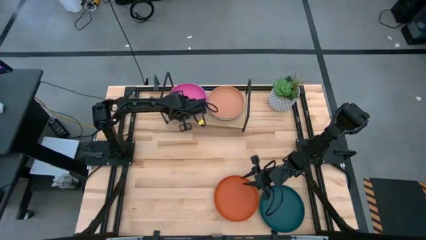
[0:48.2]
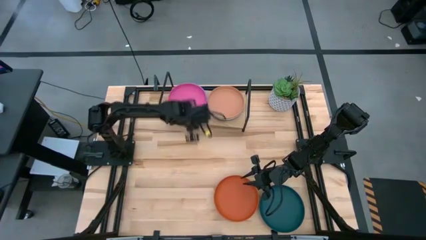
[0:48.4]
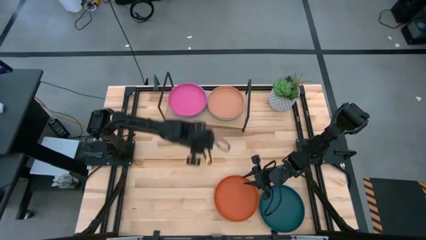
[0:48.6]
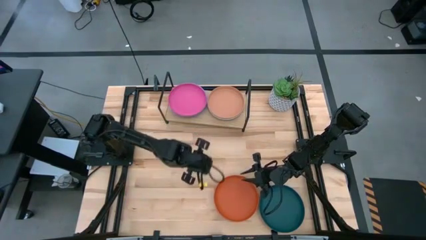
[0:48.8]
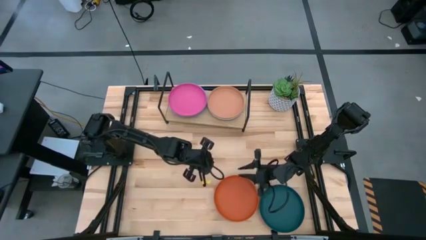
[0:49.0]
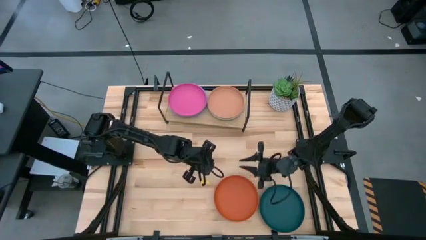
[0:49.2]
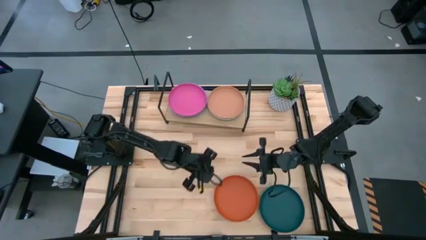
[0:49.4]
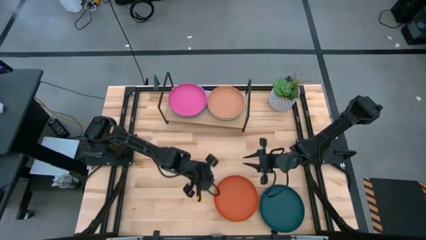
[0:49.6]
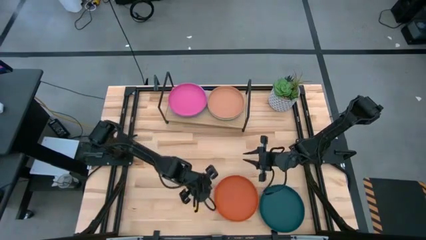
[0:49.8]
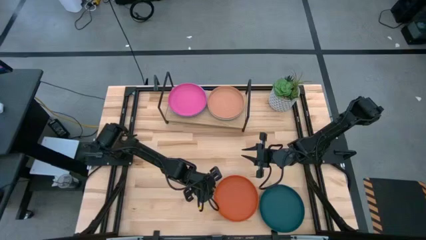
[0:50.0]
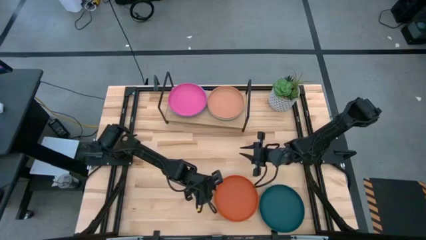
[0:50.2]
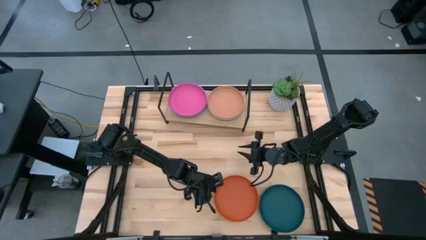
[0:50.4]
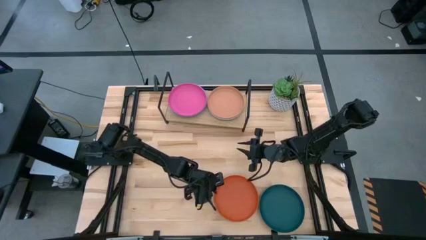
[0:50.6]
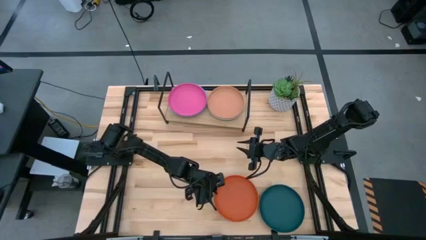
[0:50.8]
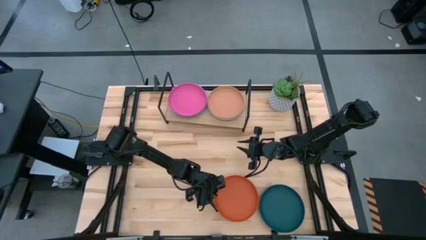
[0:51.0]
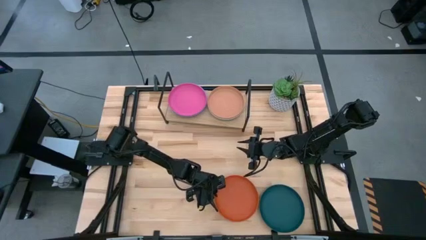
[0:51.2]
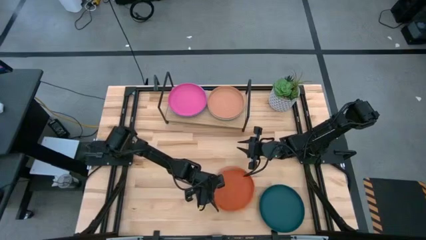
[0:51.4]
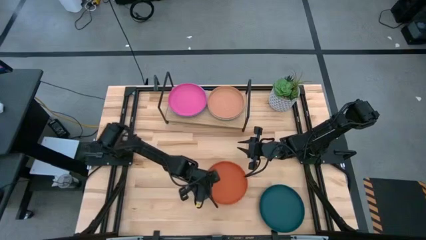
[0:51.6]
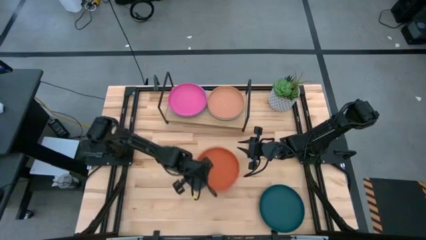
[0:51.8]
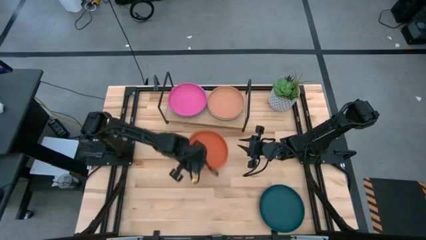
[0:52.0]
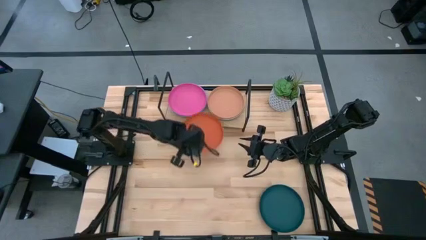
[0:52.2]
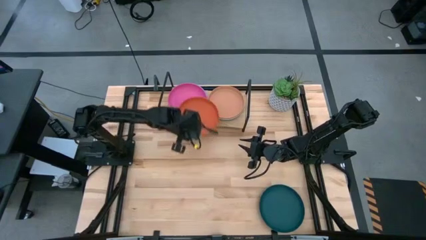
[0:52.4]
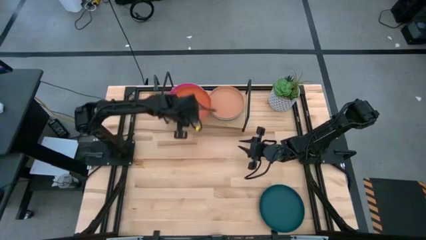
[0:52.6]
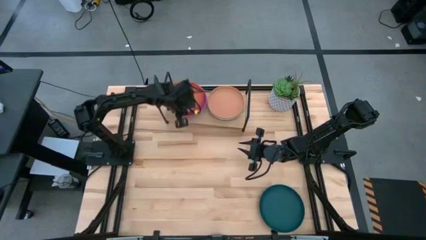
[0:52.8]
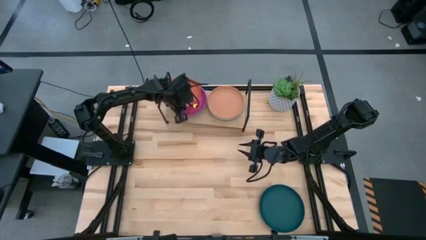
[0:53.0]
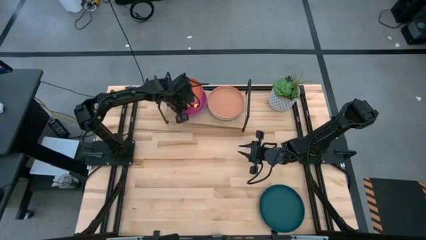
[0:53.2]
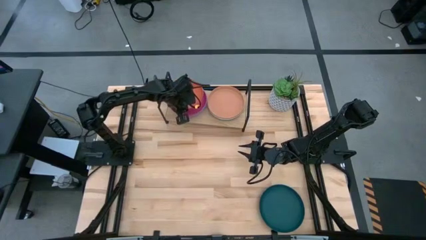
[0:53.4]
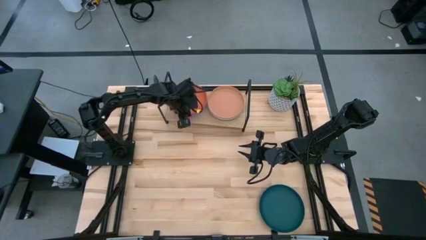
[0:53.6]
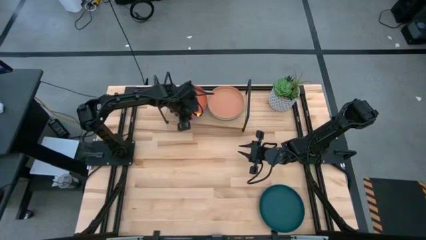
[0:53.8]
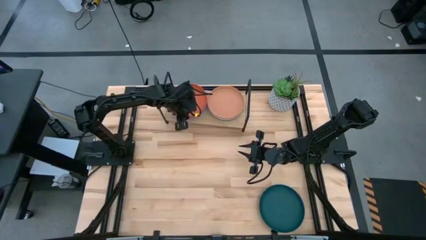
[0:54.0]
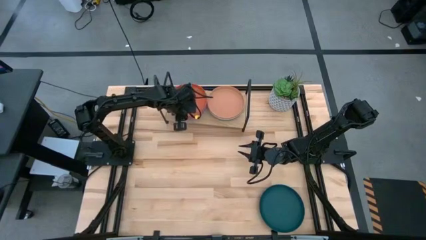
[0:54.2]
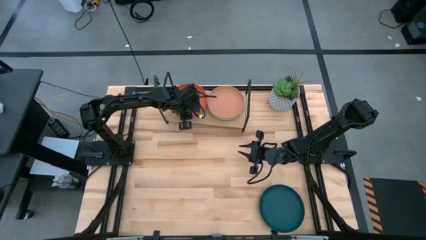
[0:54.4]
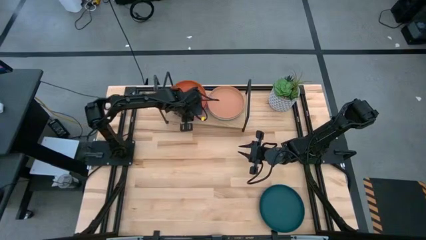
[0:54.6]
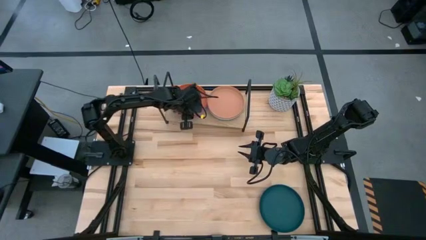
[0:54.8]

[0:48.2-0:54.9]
Task: Place and stack plates onto a shelf
Stack the orange plate on top of the pink plate on the shelf

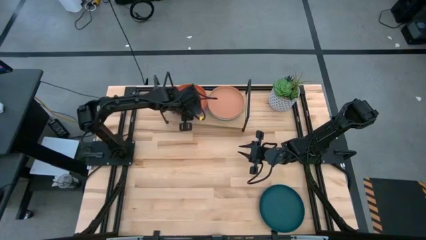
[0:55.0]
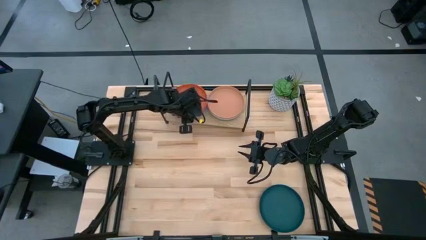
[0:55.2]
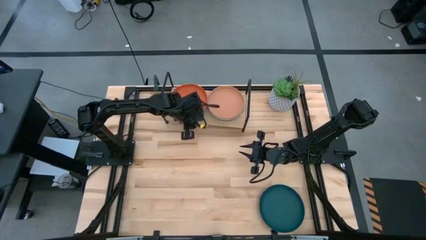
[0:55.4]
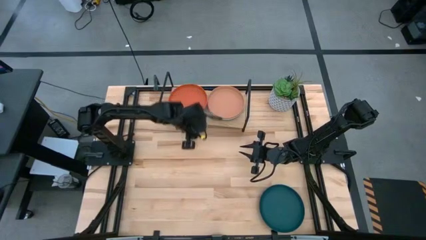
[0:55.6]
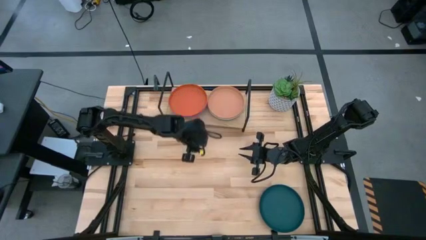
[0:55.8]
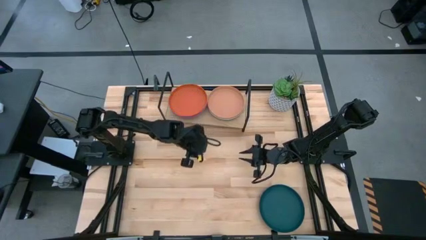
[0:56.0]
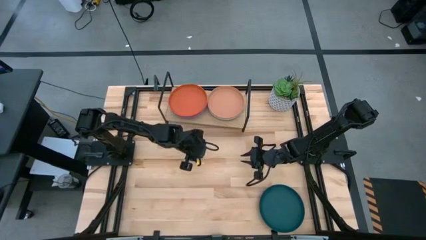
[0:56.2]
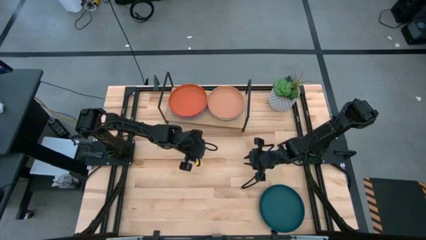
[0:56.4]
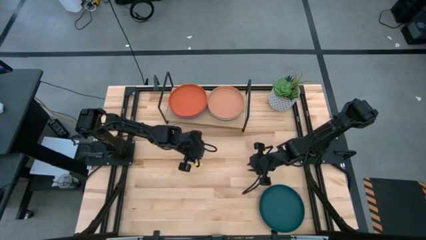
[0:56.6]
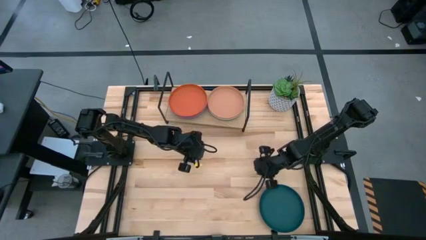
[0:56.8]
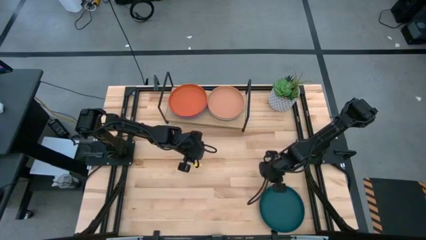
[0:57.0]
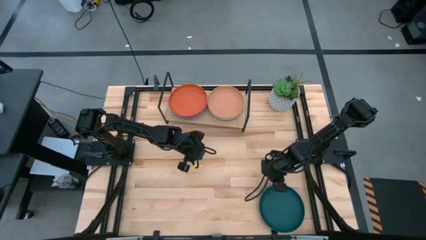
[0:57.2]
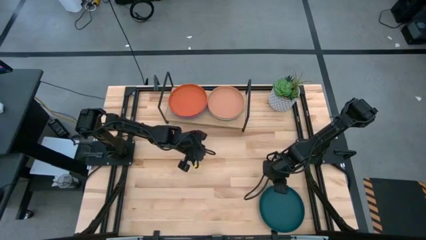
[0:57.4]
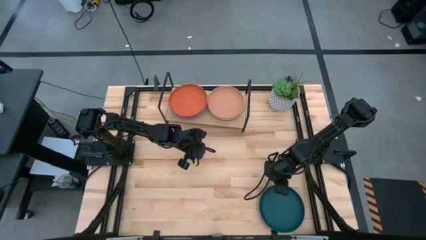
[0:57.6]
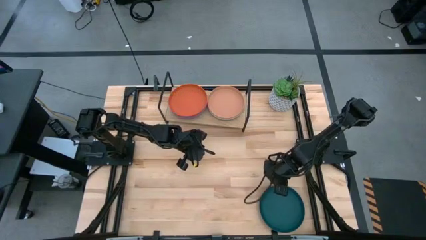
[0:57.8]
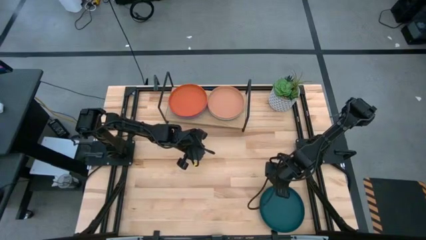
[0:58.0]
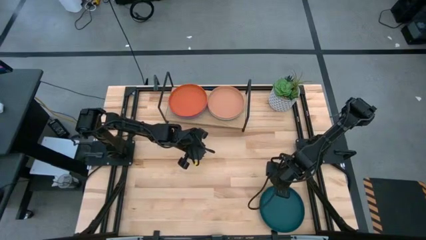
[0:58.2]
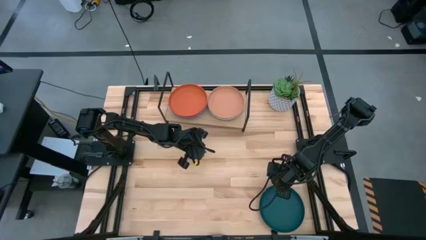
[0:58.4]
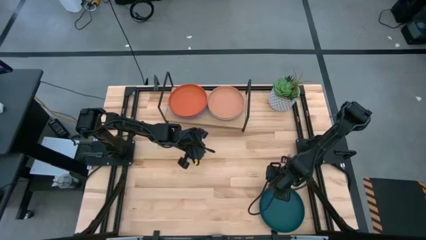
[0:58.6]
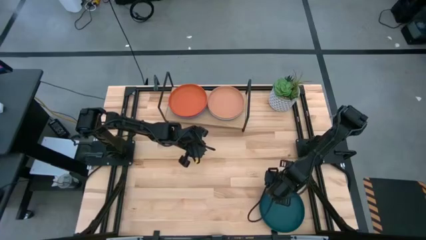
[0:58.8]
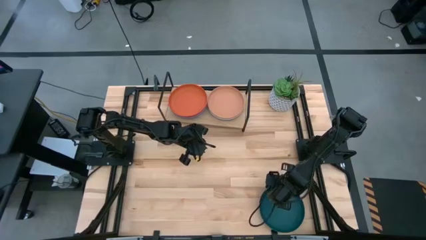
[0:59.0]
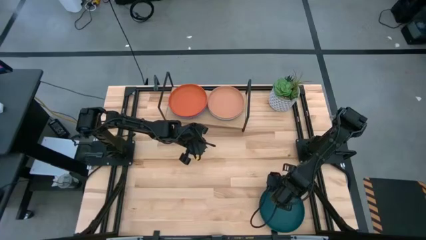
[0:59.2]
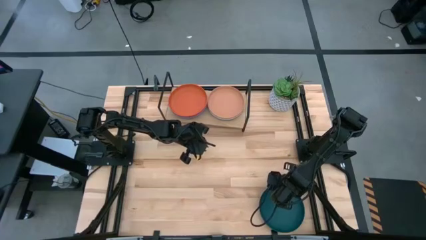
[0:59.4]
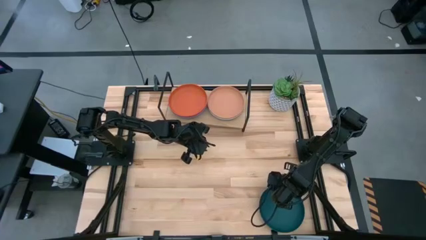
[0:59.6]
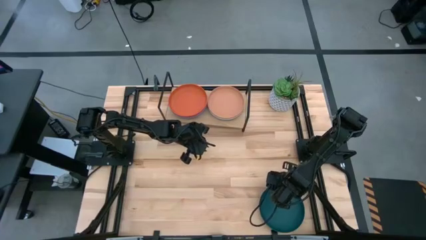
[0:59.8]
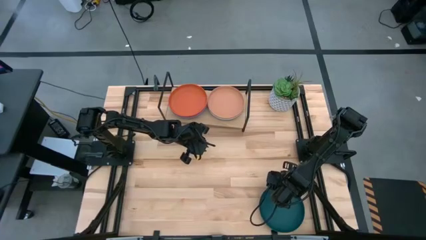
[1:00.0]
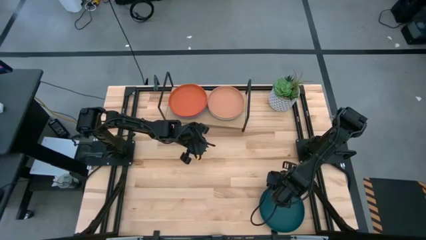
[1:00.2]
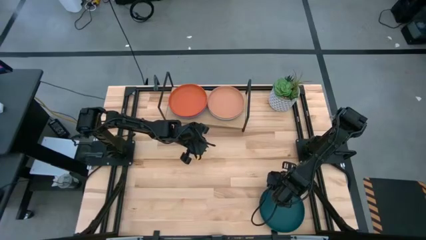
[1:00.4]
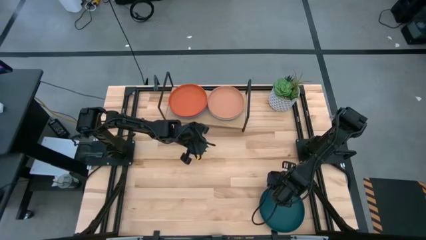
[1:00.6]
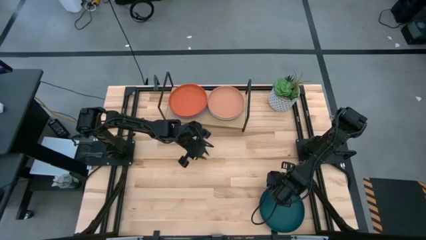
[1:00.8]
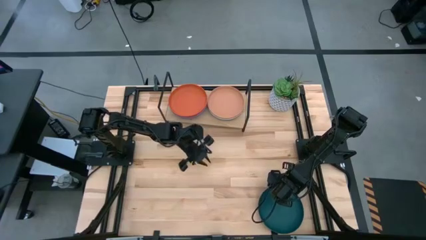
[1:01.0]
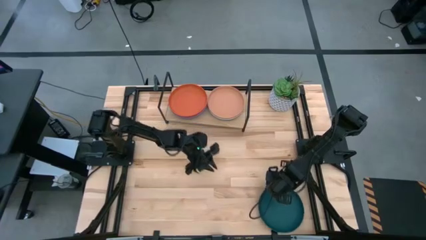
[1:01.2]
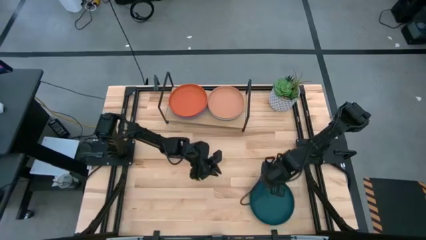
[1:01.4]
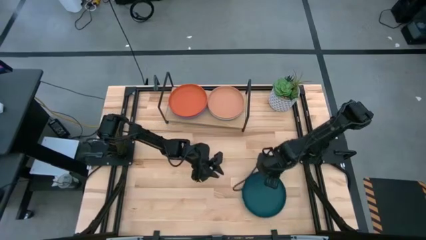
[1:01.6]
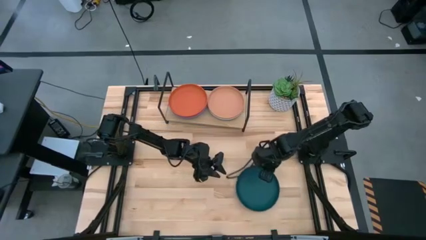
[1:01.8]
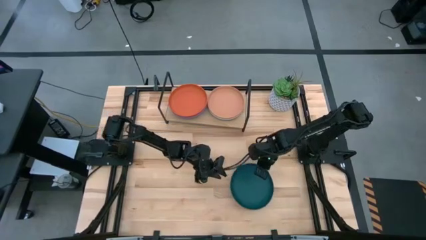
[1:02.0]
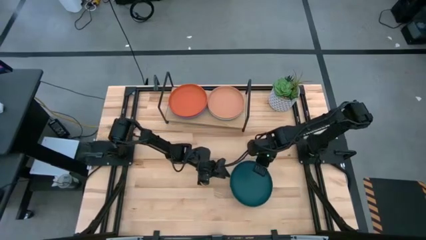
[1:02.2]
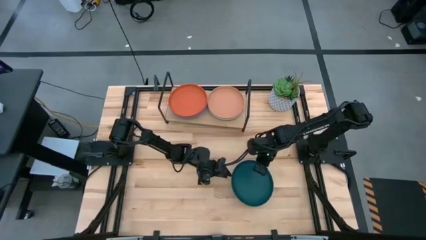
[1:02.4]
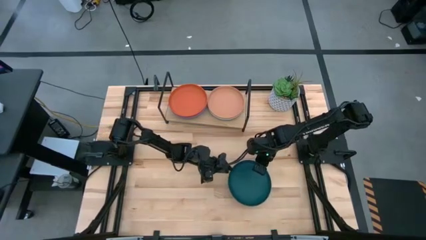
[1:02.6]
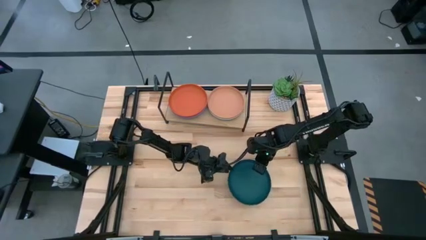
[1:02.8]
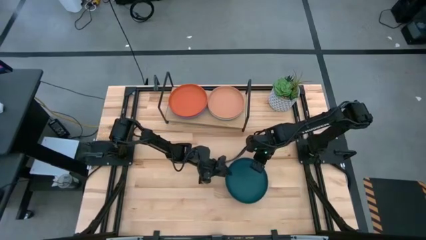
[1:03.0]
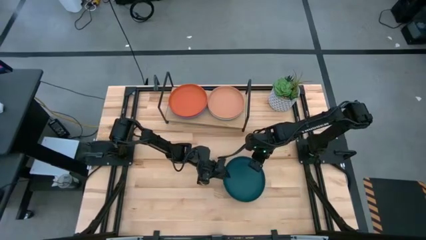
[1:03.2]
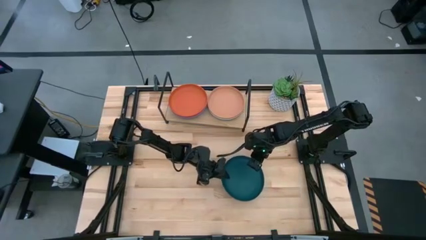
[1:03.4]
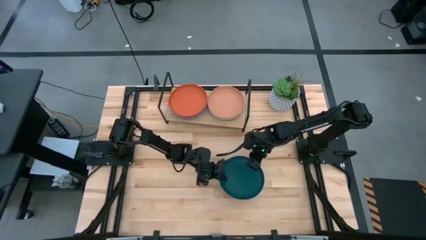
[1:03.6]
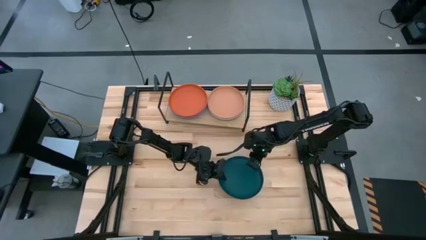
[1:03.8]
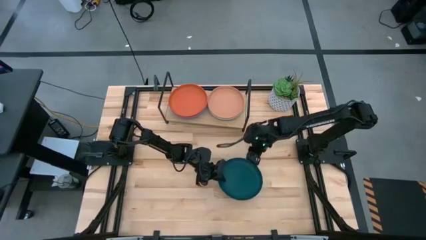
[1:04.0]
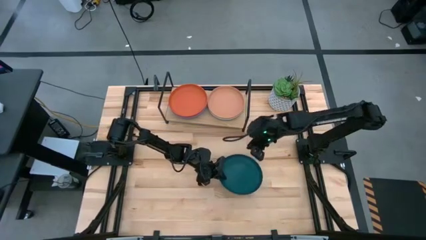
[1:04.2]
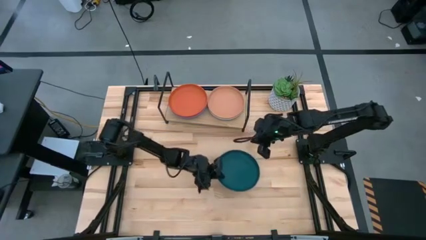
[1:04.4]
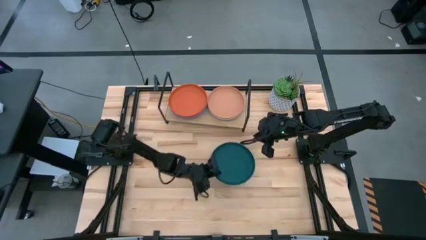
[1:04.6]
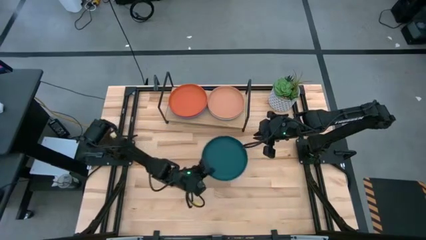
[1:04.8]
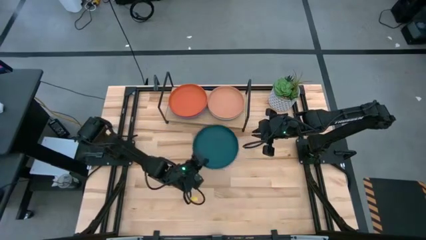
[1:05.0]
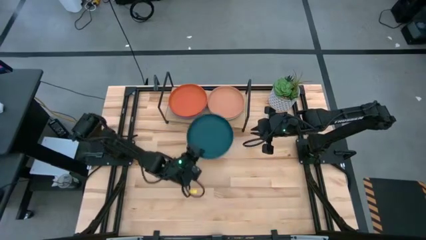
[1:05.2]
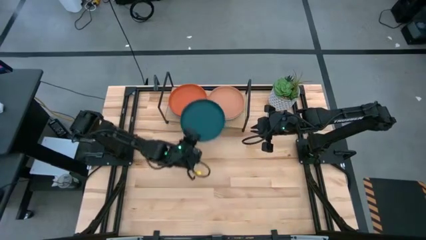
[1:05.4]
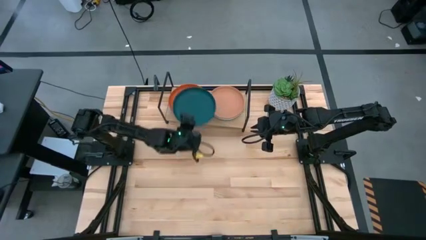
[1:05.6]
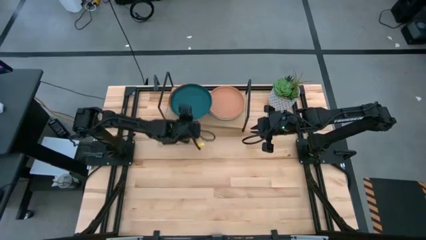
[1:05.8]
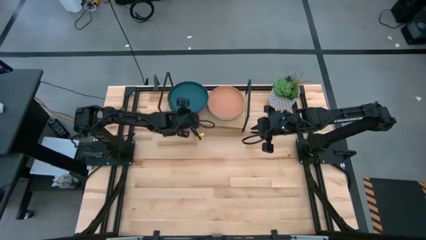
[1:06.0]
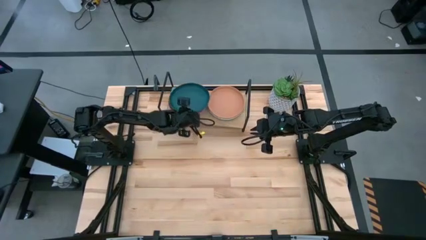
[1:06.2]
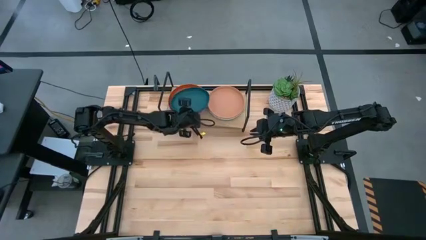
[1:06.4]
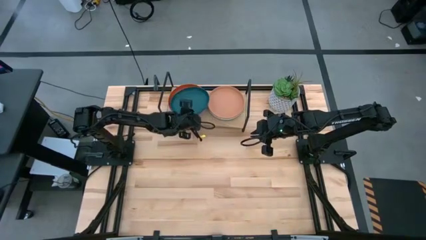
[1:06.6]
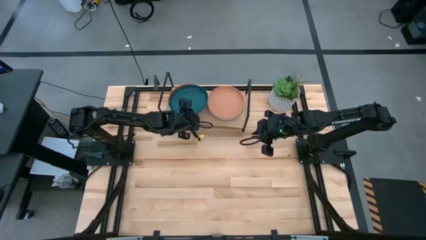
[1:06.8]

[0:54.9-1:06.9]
Stack the green plate on top of the orange plate on the shelf
